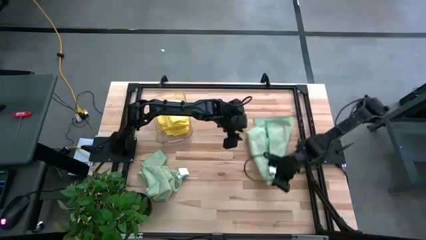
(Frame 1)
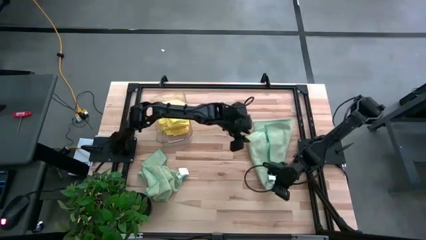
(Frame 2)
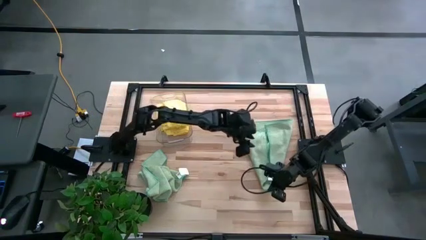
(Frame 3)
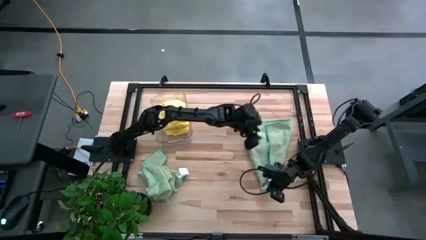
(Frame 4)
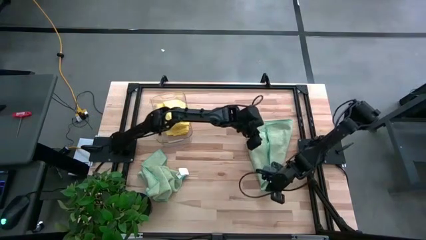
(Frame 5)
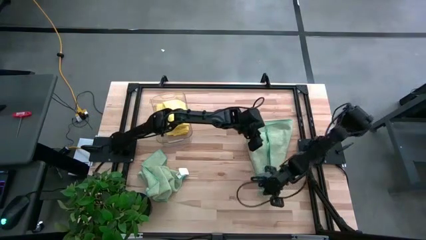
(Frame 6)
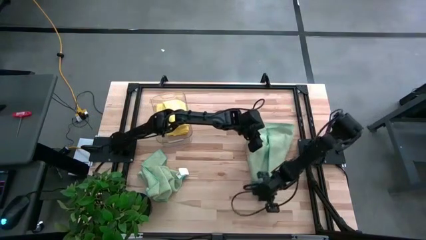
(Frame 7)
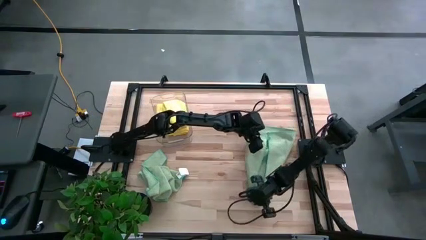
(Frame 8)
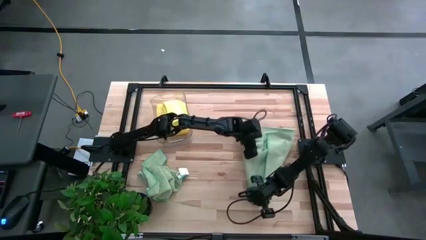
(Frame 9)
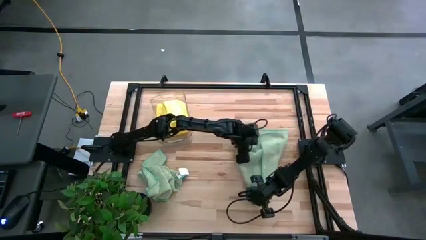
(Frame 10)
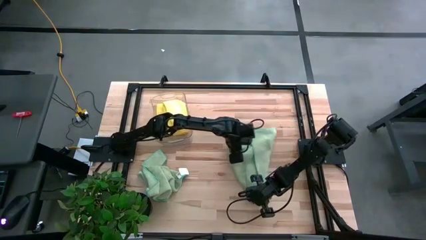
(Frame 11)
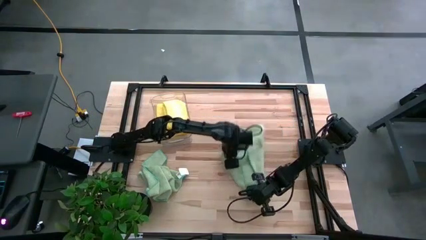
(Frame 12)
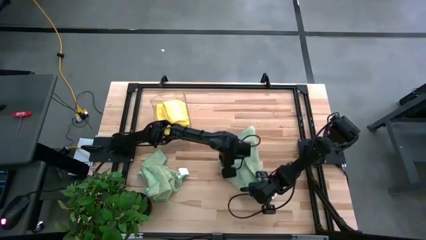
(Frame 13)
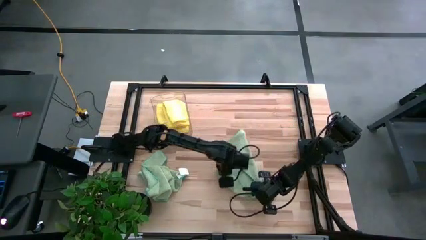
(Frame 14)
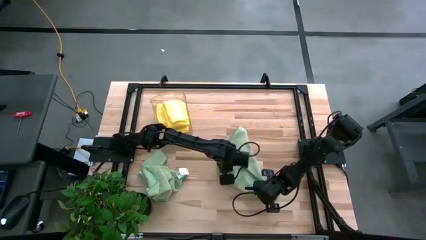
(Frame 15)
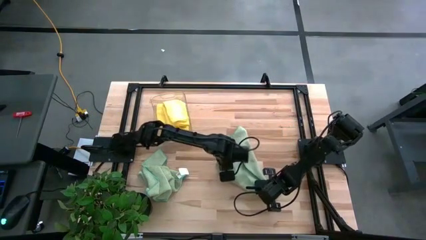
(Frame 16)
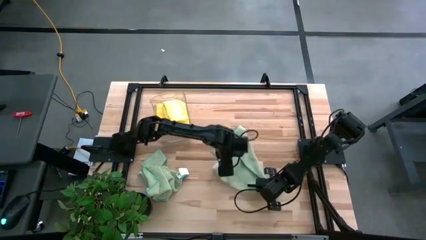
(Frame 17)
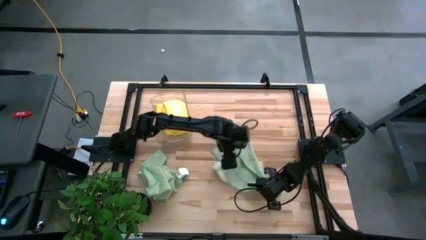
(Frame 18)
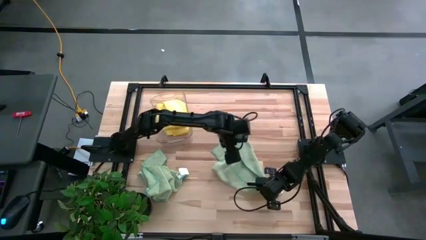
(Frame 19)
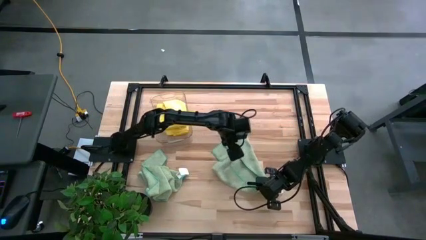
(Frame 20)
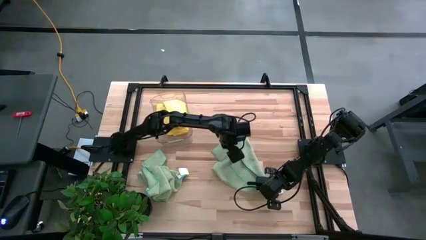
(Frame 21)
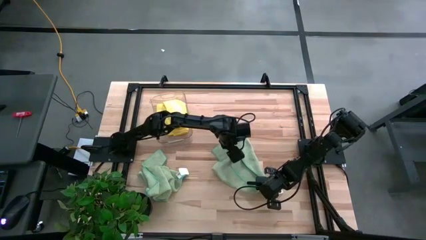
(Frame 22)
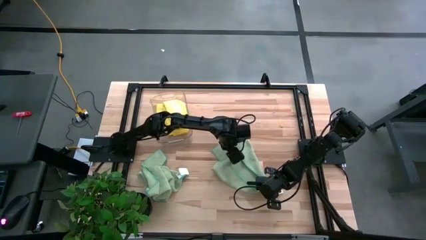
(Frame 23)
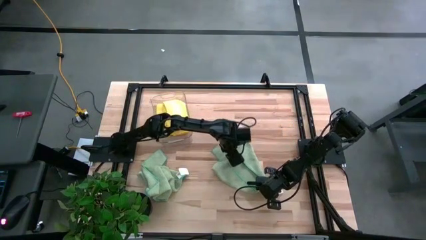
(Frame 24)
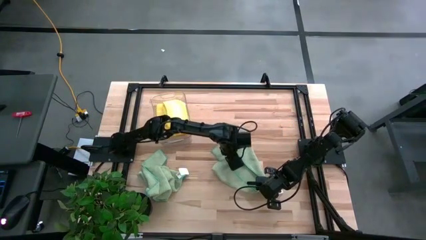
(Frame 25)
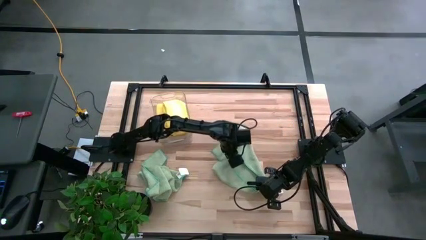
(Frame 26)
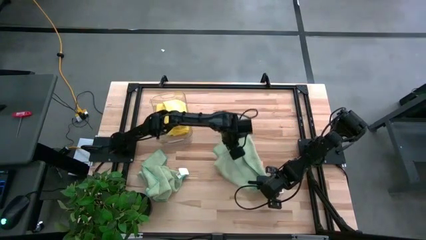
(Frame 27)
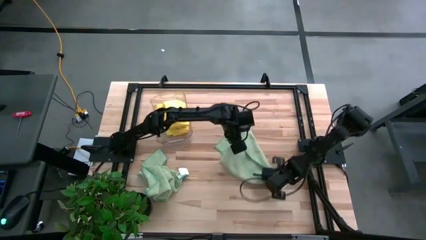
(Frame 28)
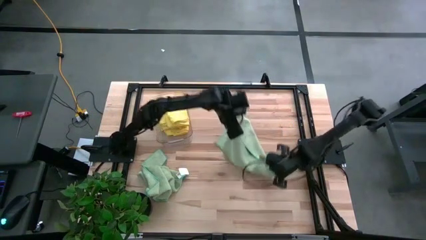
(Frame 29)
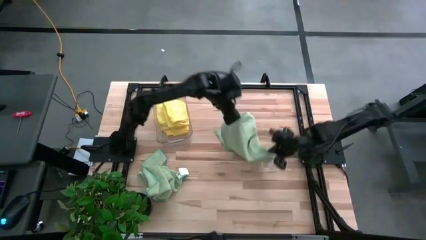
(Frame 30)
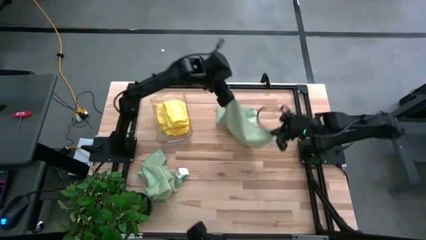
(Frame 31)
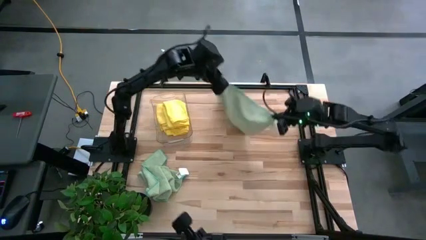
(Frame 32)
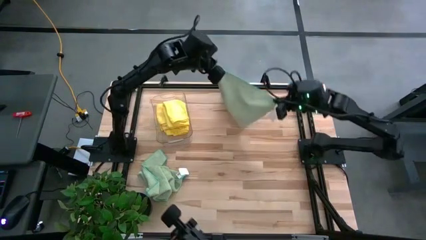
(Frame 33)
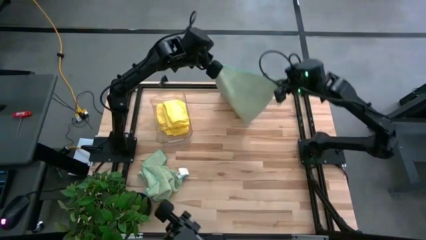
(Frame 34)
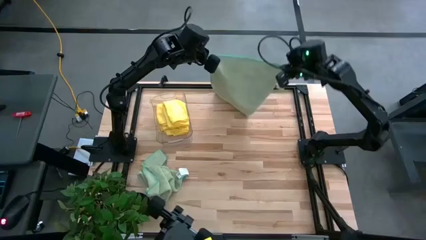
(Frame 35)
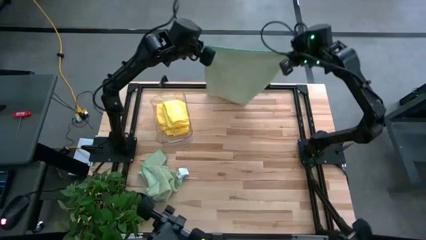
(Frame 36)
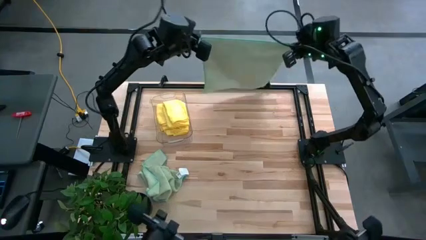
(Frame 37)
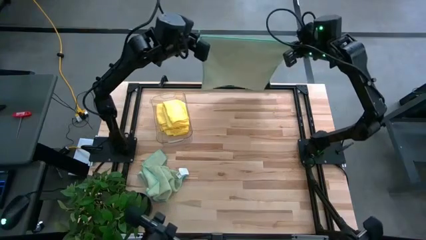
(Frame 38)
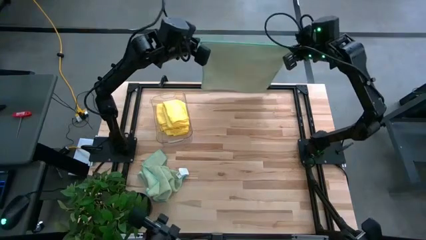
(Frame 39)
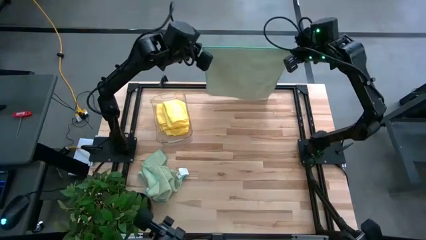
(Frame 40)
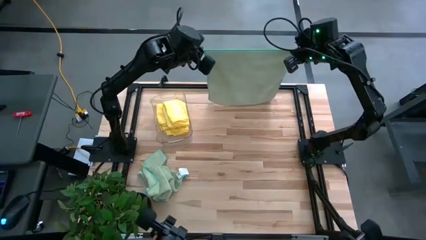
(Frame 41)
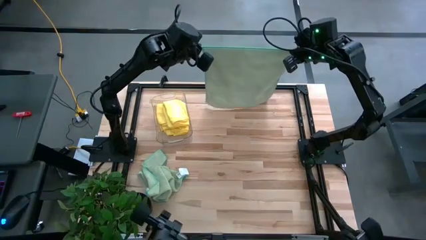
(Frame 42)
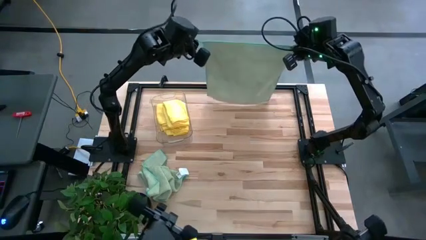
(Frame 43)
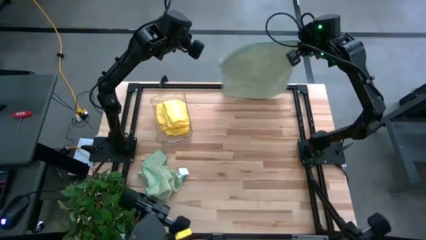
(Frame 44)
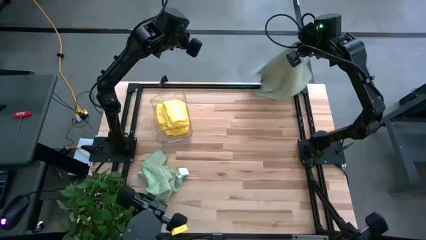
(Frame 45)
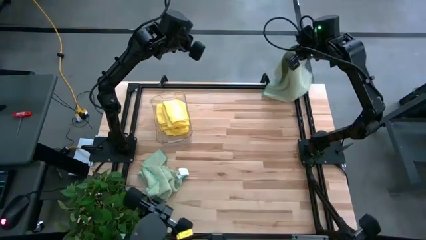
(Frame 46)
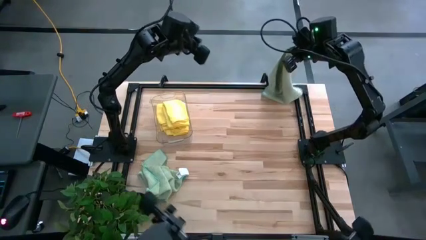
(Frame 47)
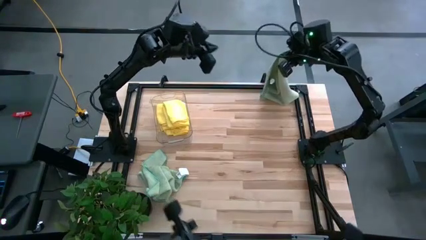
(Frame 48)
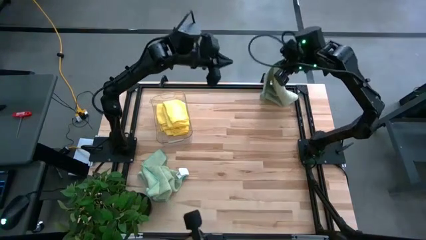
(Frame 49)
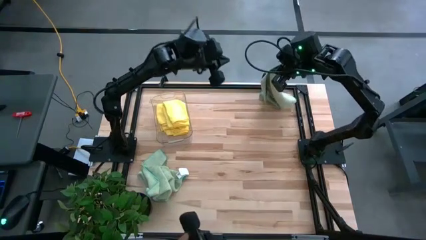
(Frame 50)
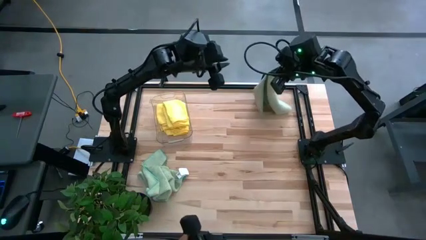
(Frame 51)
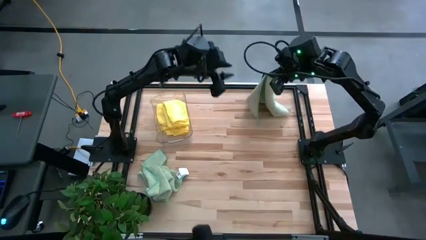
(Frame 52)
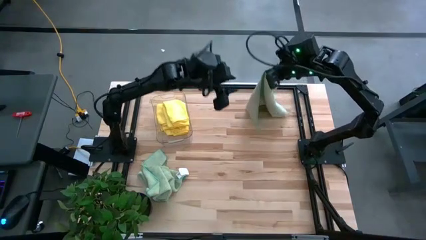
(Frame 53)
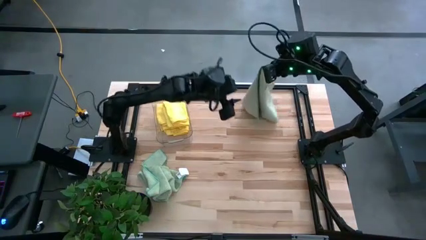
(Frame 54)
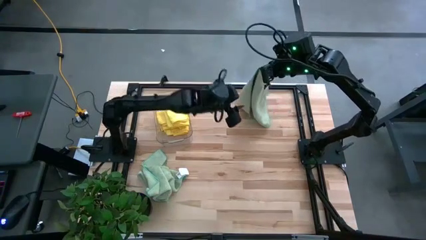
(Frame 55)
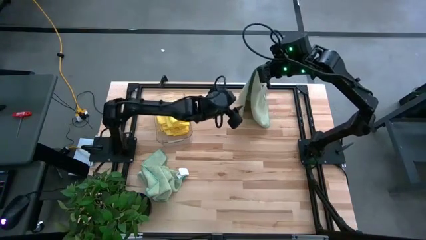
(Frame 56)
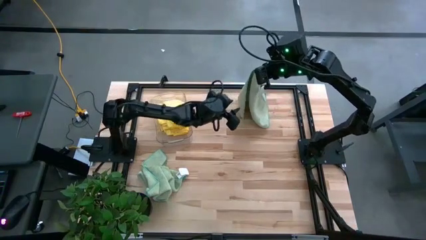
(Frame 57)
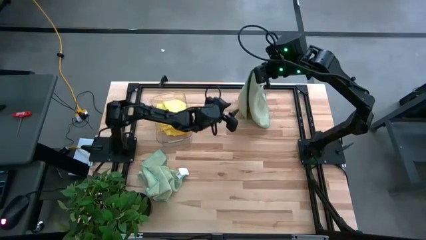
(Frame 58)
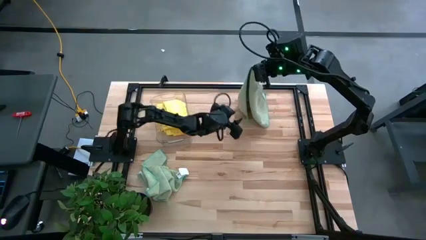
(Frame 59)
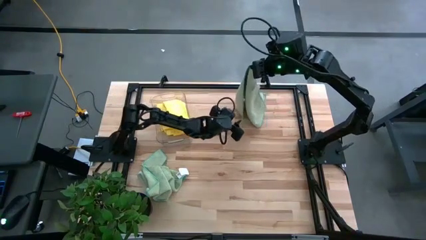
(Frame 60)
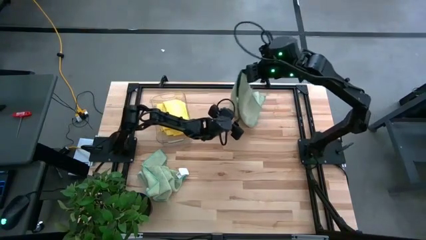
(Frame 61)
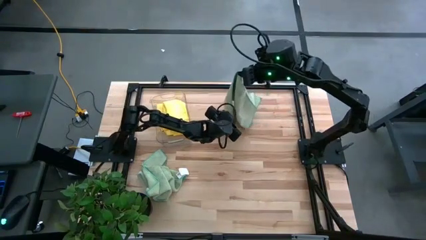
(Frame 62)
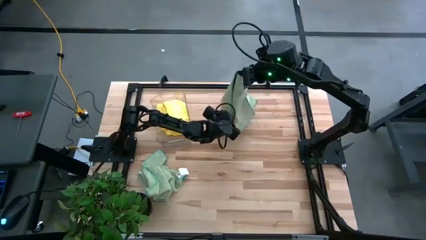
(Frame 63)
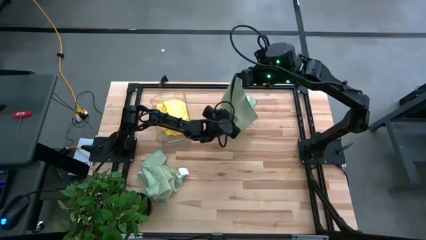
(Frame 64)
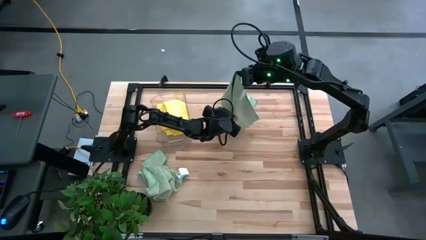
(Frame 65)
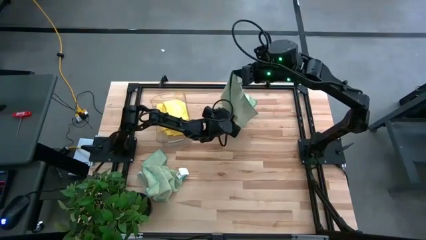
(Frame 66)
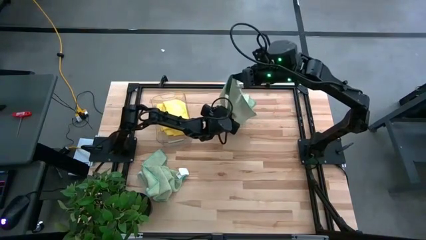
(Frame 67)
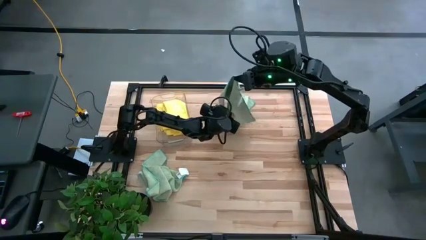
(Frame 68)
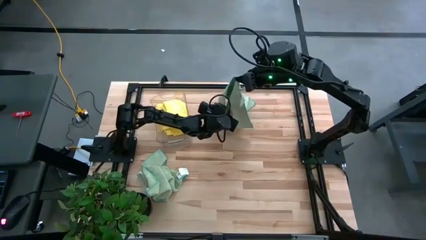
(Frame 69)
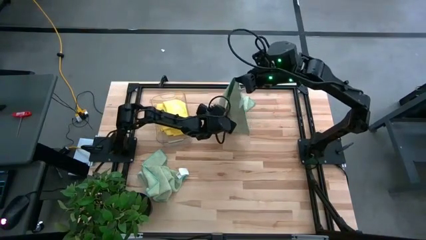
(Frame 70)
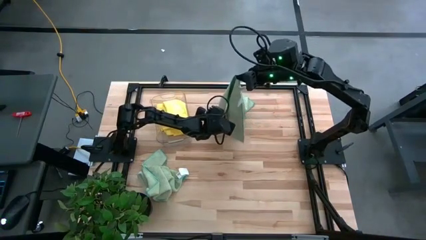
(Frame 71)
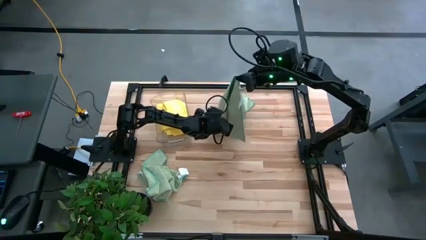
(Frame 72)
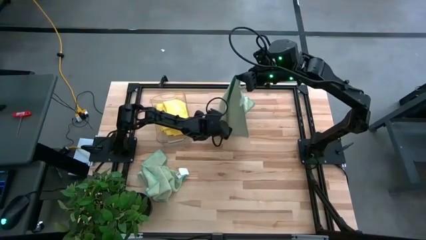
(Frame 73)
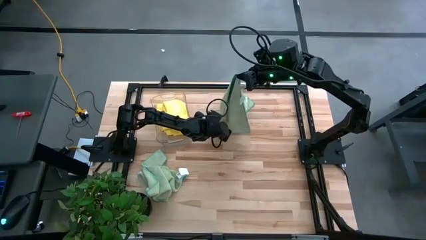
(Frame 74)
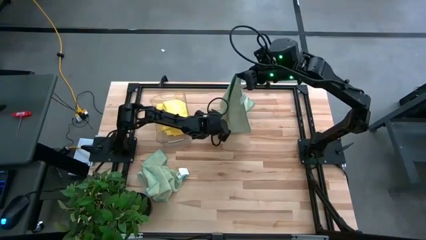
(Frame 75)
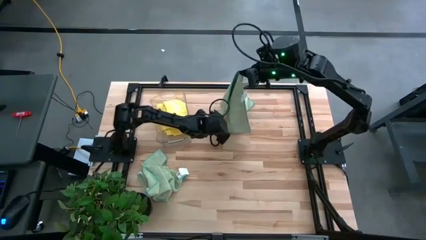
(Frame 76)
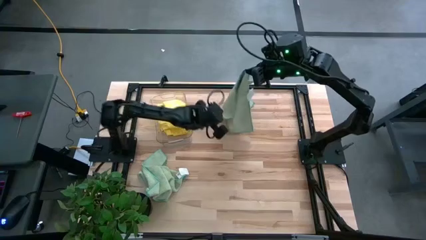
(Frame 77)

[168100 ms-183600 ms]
Task: Fold microfiber towels
Fold the right green towel
